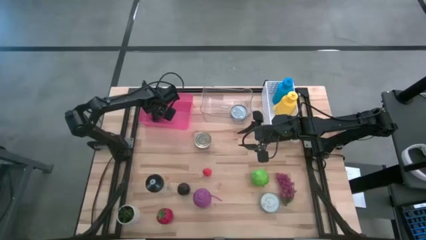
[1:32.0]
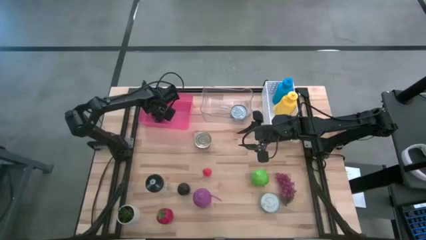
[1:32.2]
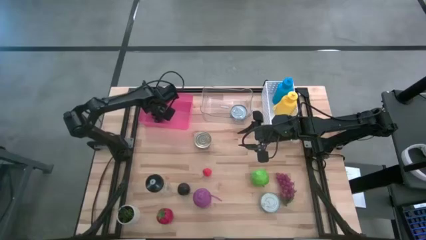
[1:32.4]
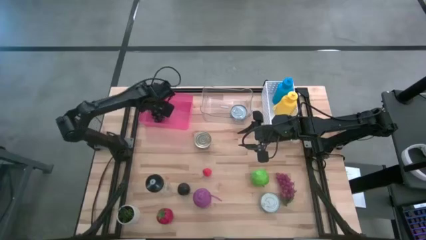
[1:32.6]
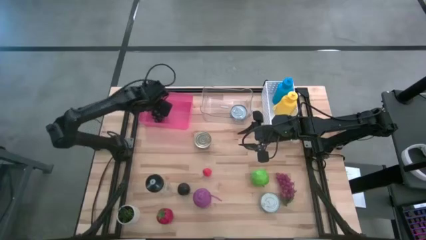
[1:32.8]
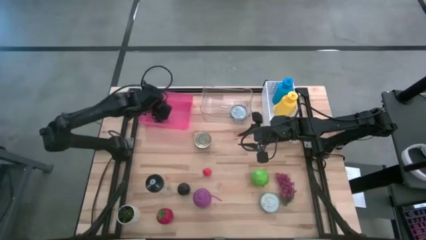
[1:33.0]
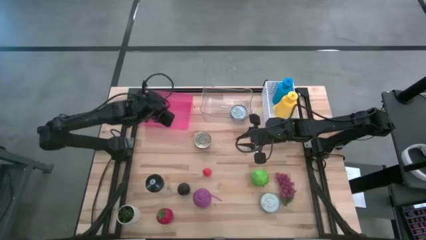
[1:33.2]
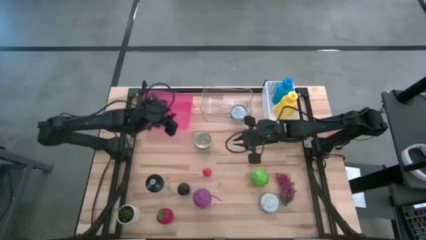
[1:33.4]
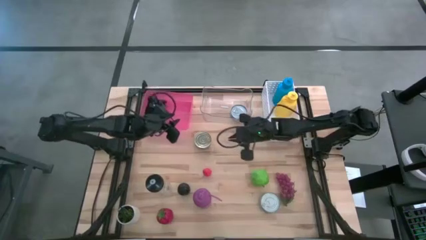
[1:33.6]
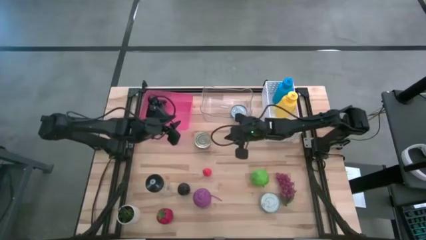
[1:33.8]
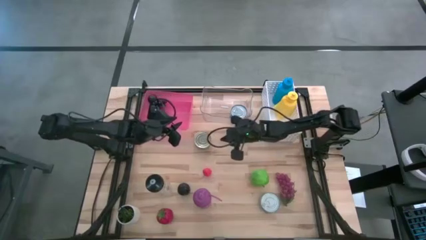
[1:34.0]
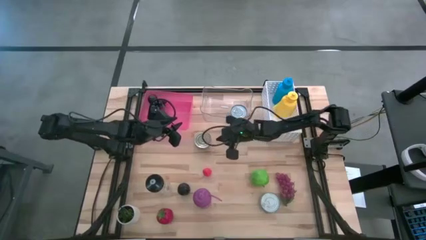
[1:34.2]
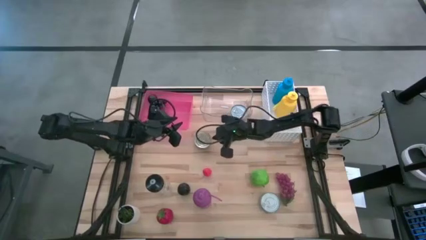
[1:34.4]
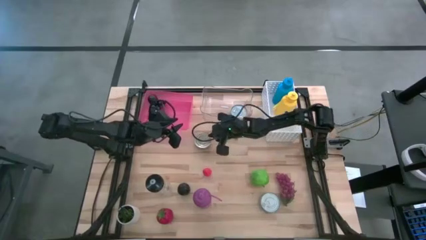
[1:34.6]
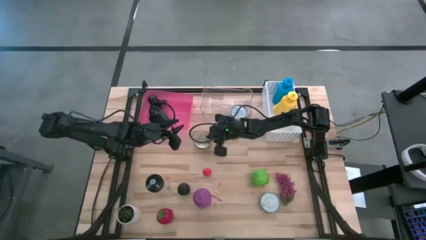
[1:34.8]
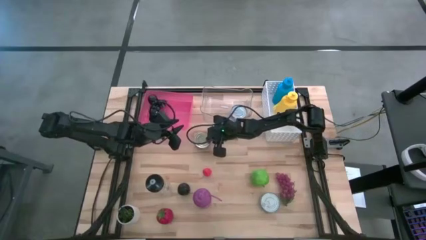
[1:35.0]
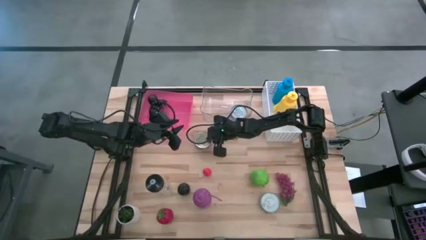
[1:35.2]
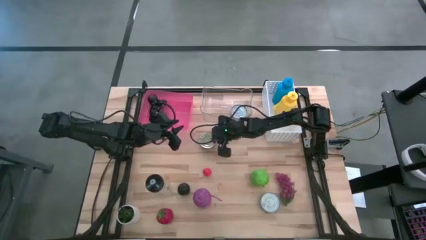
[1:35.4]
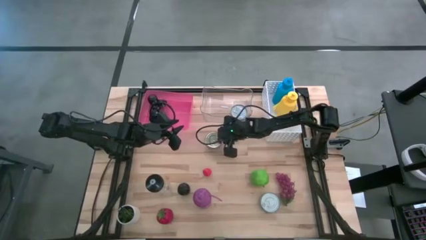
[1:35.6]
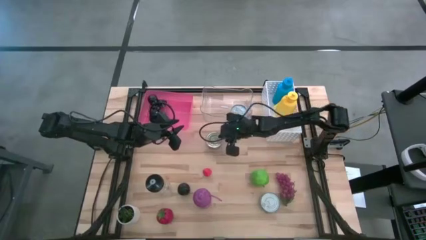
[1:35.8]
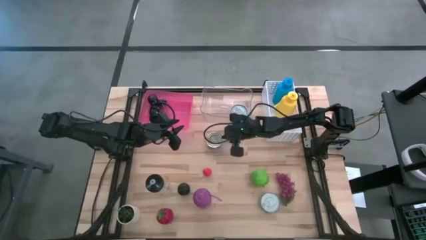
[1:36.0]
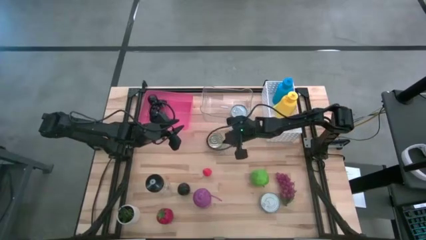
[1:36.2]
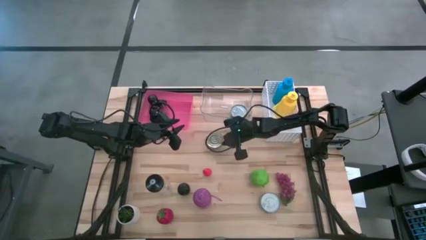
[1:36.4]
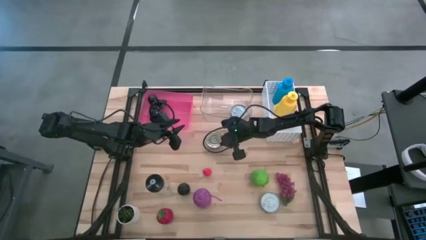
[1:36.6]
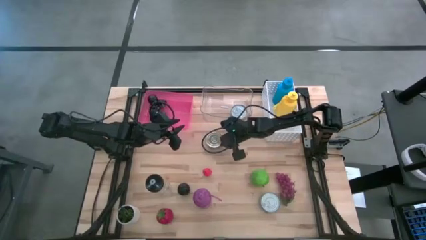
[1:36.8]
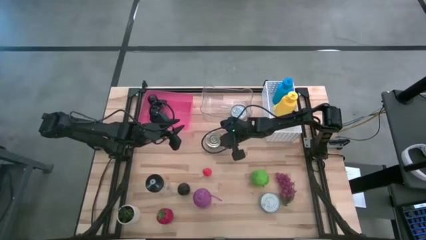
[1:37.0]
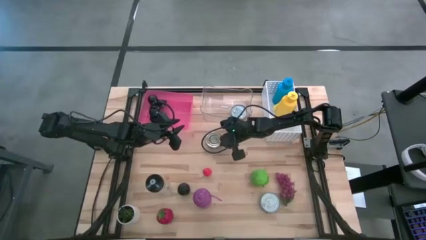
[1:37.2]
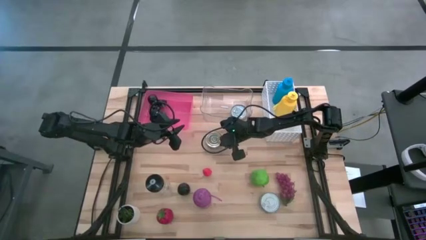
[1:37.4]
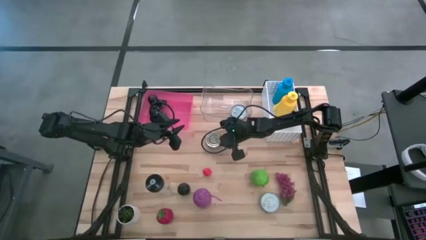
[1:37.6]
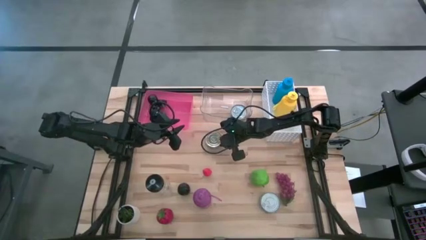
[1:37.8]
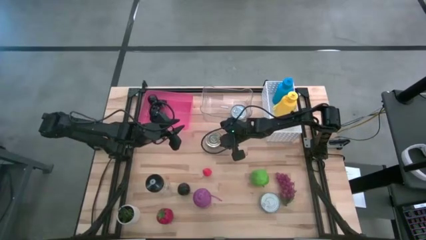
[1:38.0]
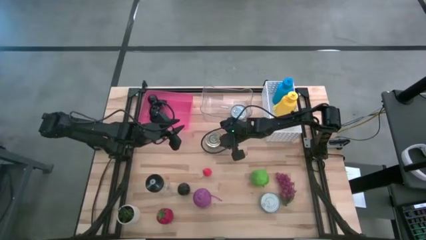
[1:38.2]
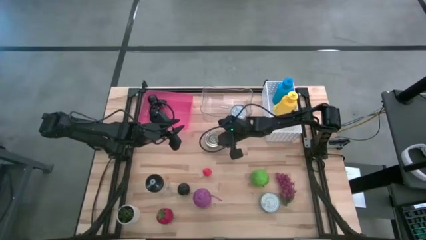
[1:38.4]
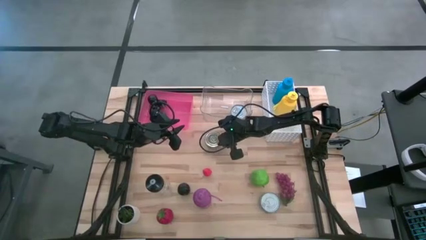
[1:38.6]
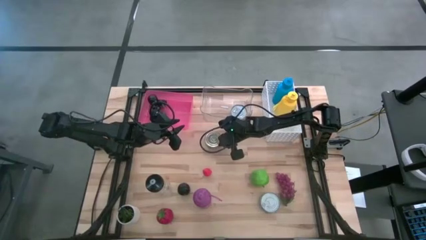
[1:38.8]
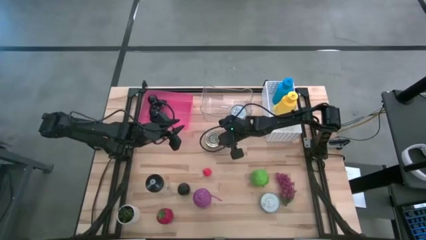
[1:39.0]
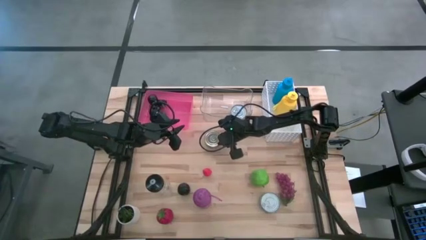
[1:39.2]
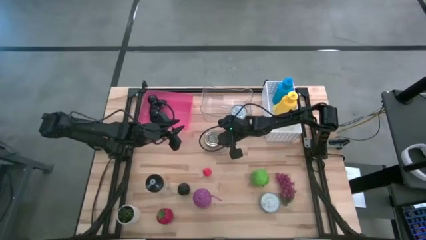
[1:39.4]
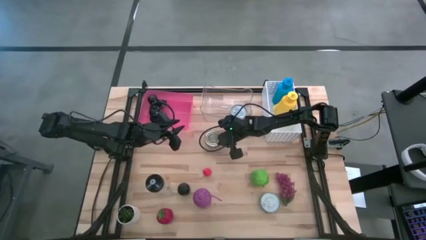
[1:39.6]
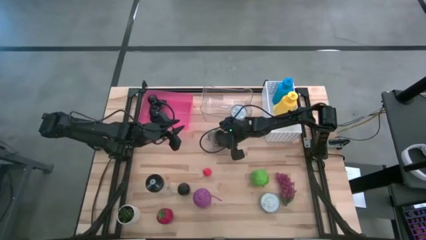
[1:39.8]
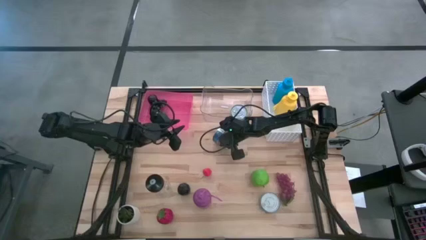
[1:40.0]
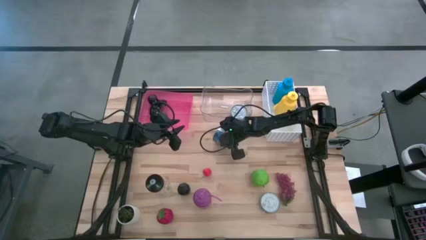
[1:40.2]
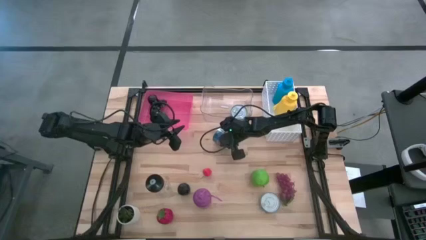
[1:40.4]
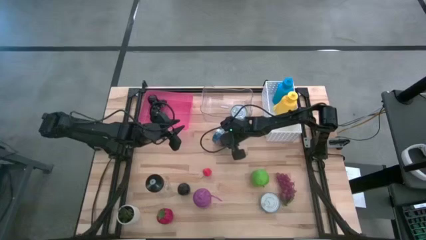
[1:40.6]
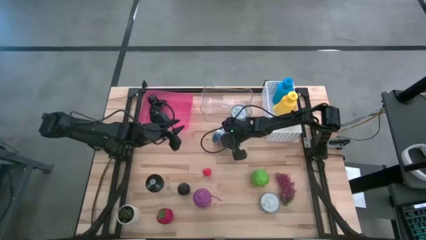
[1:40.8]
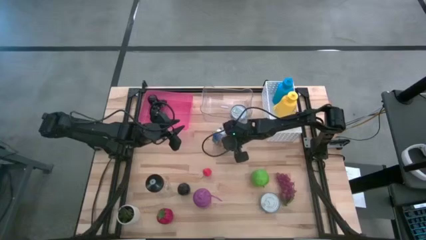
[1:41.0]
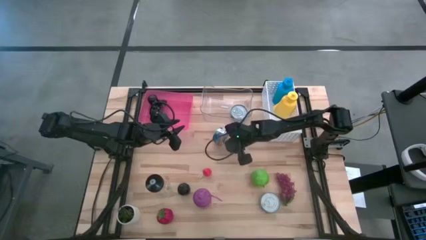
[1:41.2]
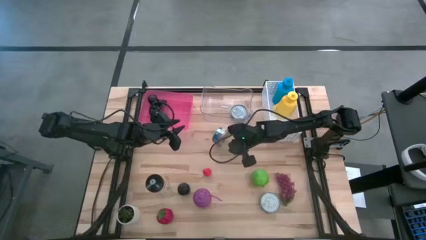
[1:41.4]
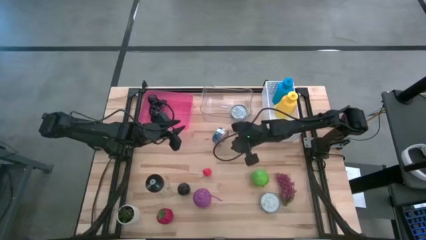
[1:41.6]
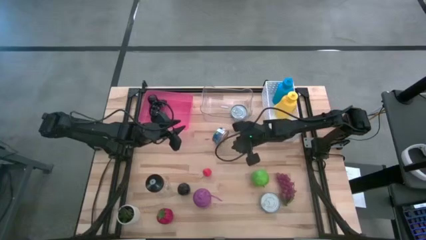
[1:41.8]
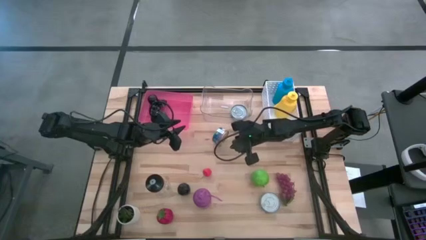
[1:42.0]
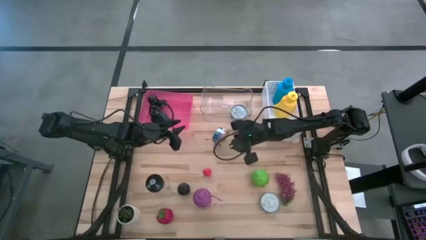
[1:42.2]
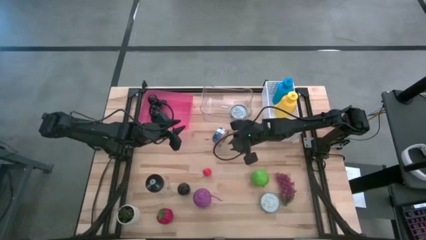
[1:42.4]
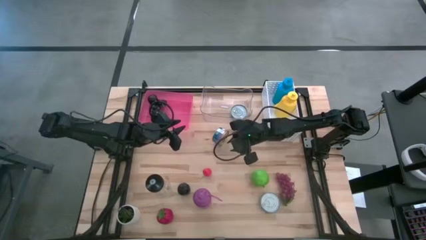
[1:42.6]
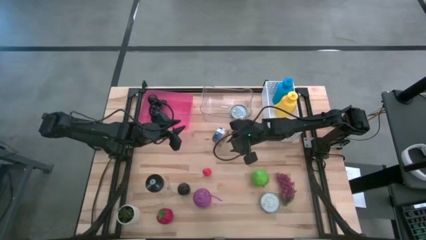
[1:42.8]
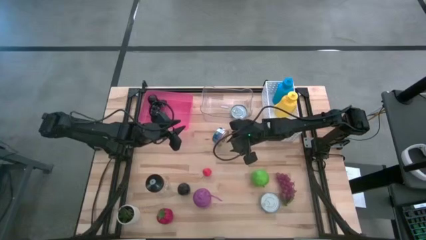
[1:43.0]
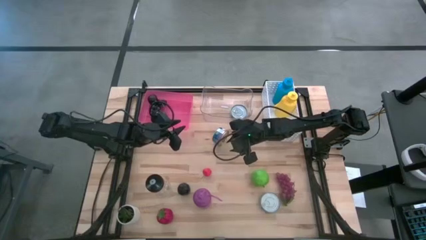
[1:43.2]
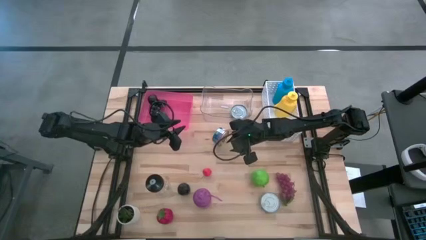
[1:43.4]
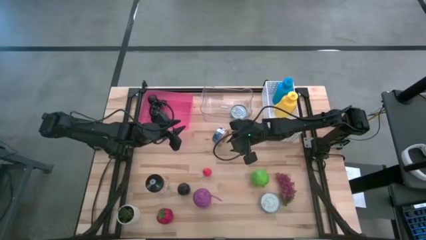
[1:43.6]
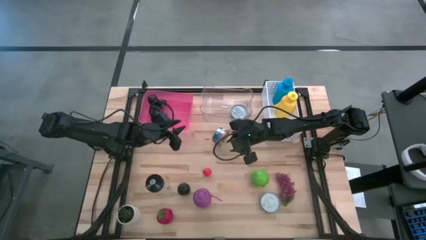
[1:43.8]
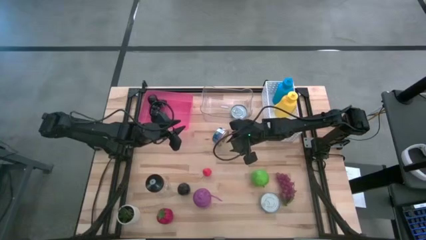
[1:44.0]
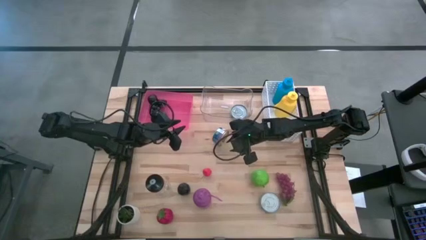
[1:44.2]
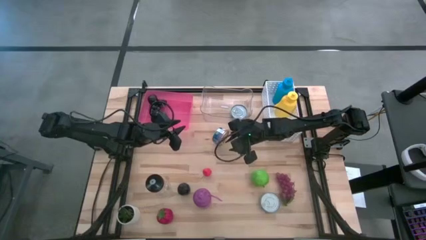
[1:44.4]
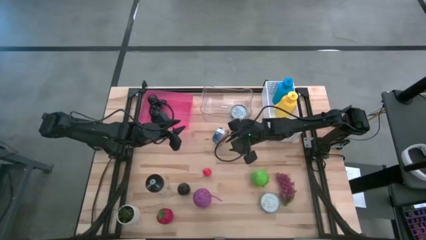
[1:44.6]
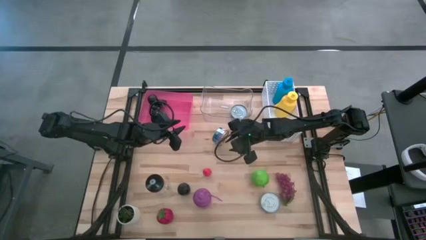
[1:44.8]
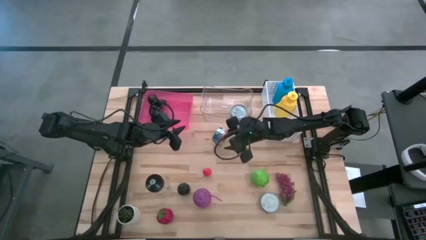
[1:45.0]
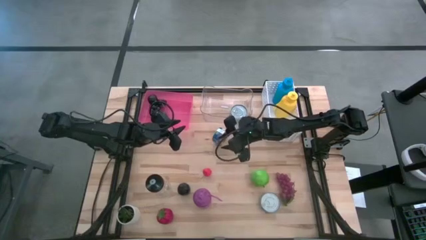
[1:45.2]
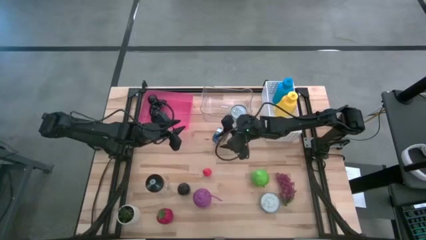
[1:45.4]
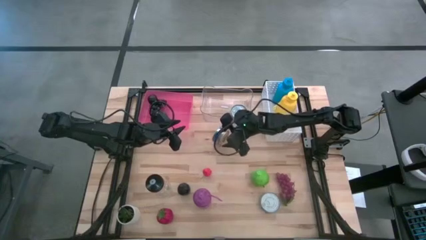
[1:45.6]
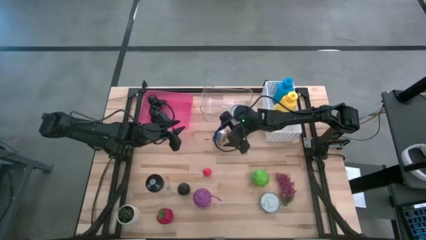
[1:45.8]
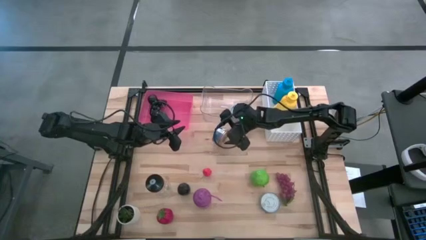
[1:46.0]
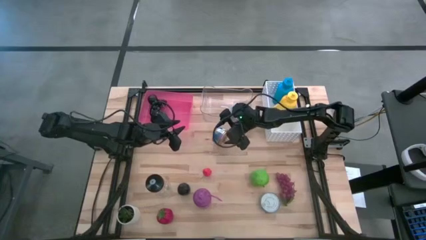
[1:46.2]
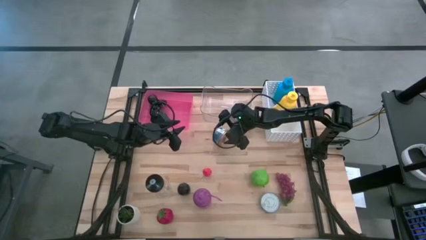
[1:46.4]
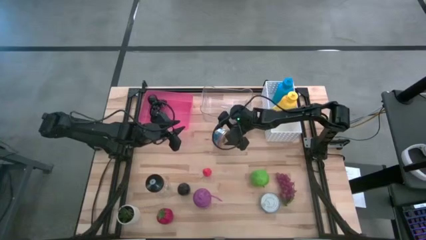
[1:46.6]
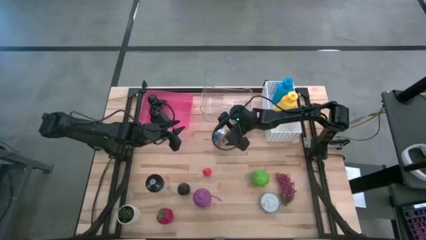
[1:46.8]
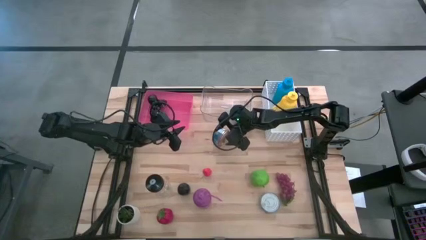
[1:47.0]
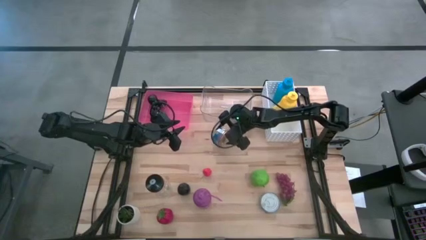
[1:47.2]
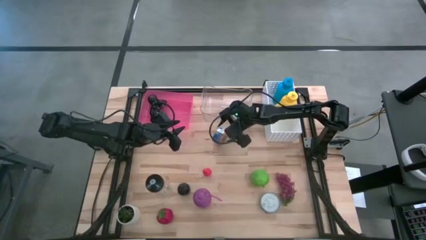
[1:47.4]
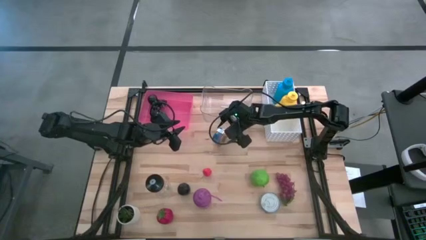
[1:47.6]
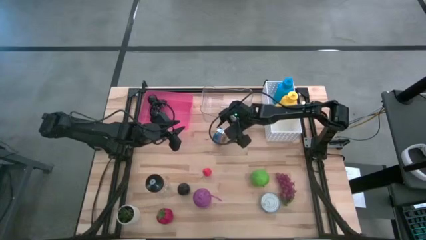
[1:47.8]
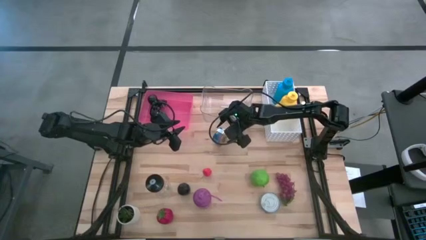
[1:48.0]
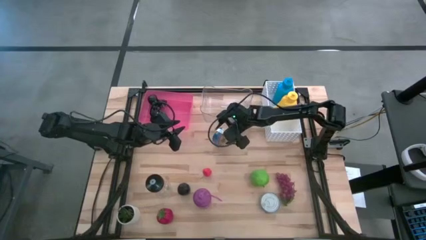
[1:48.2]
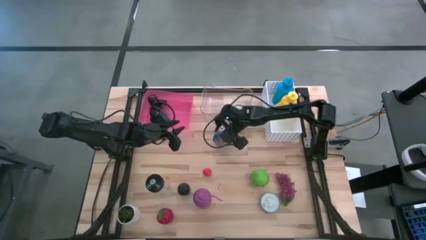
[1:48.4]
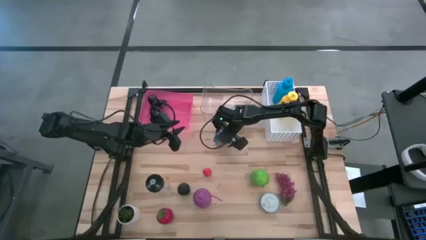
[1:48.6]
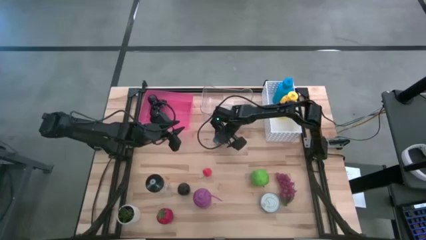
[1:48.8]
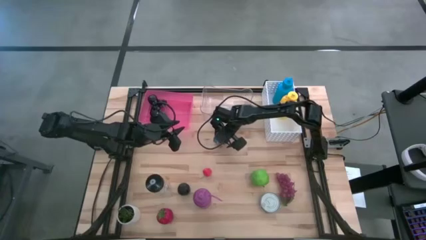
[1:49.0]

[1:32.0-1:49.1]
Task: Pick & Place Food Item
Put the blue red tuna can into the transparent bin
